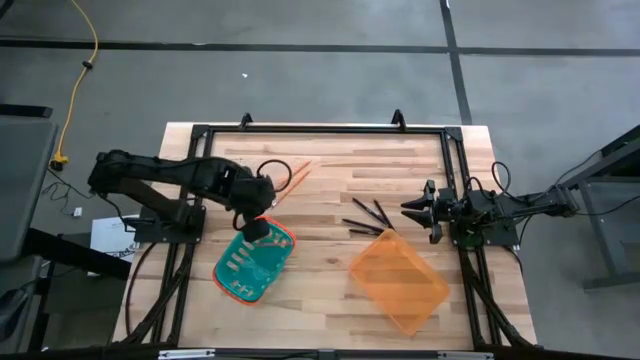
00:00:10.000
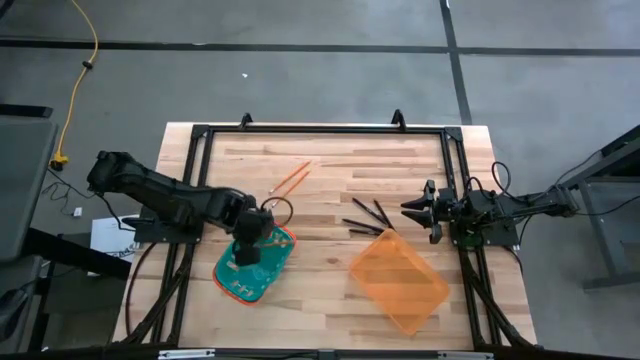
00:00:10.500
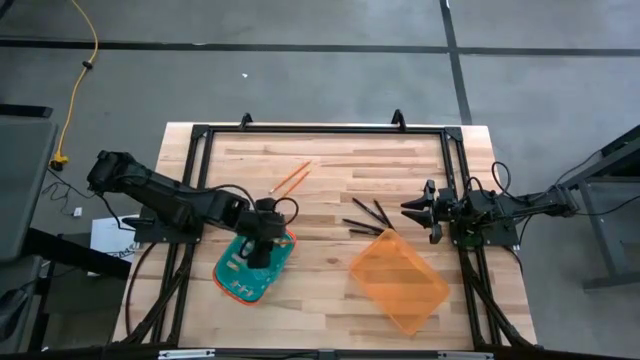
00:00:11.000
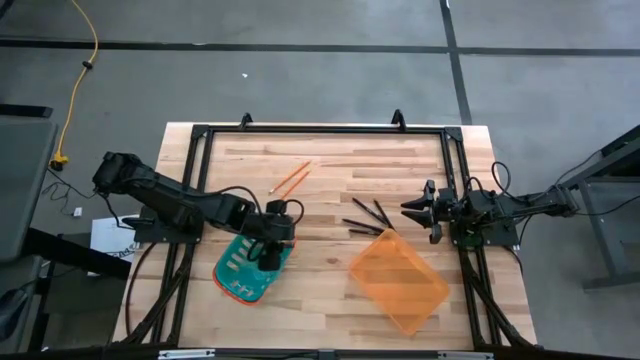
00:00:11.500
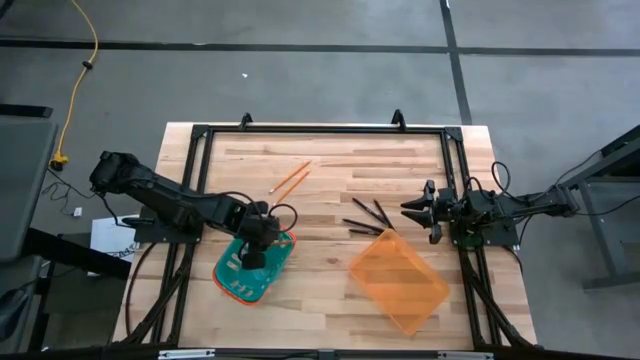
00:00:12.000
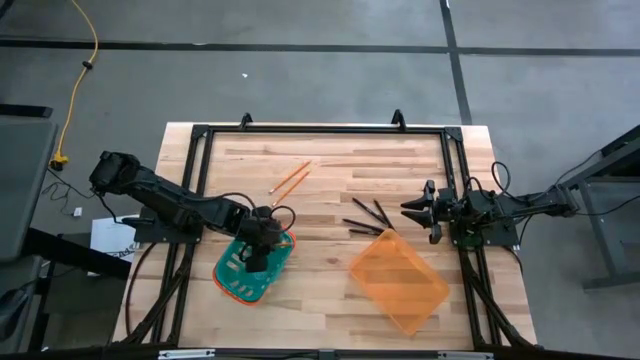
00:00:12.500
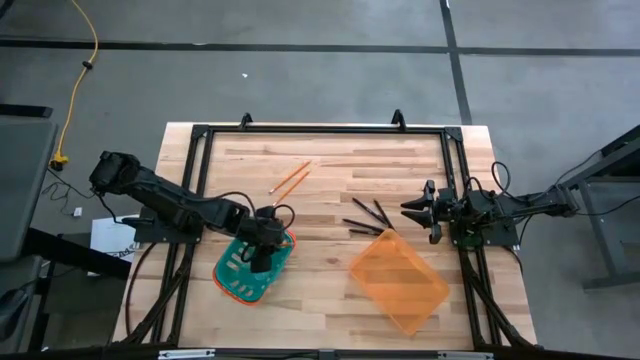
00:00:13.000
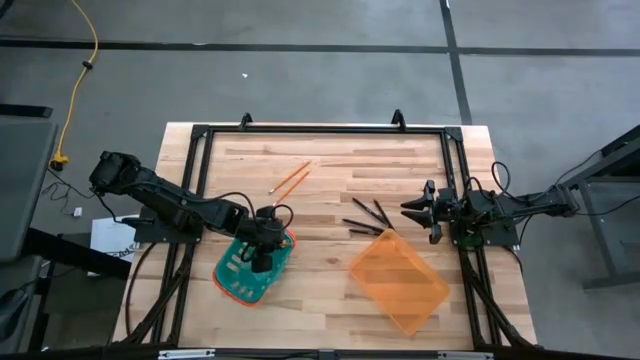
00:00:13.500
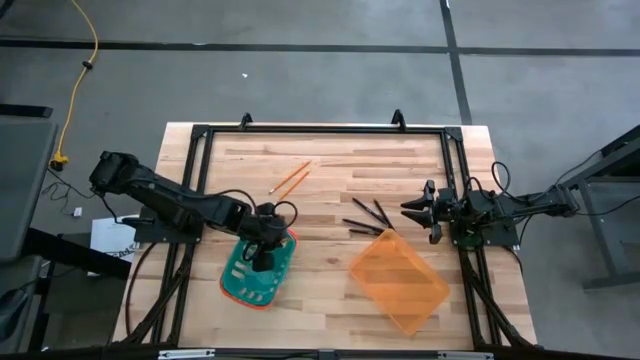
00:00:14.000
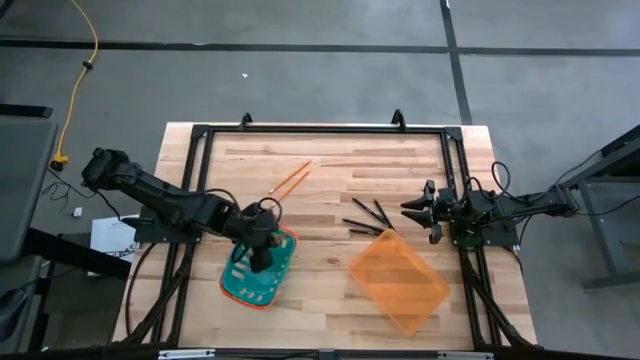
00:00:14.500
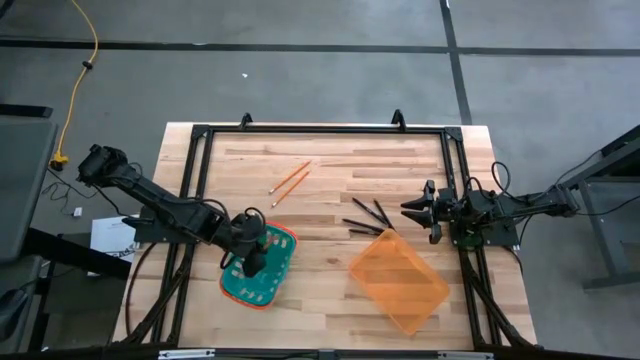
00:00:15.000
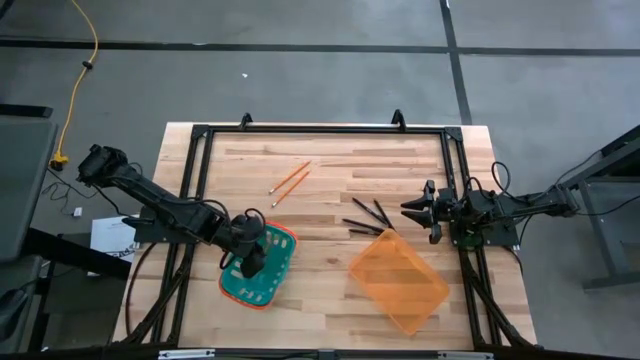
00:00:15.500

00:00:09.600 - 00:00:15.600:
Task: Sort pens & pencils
Put the orange pencil into the blue basket

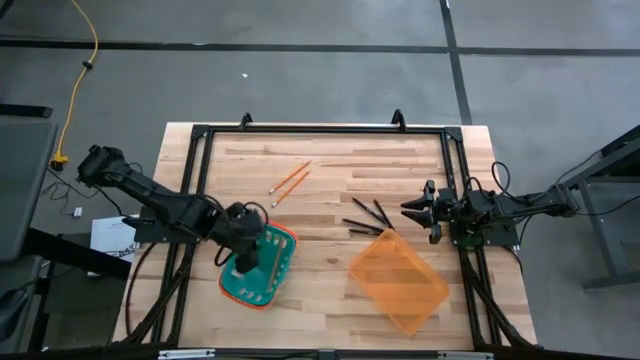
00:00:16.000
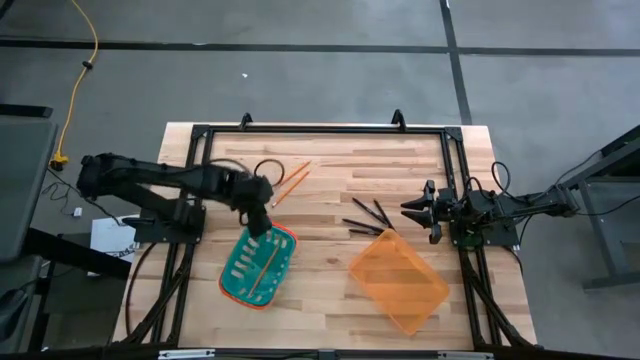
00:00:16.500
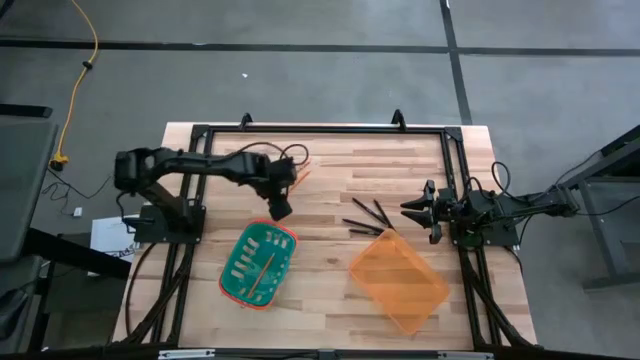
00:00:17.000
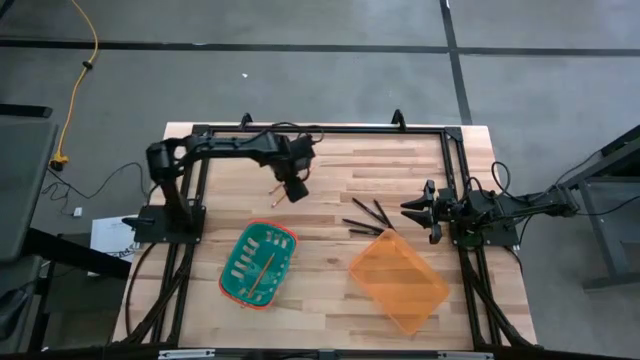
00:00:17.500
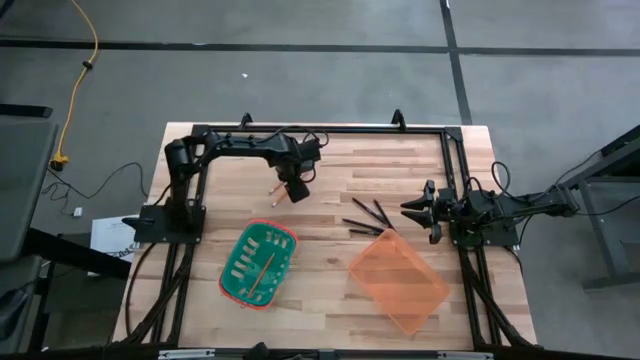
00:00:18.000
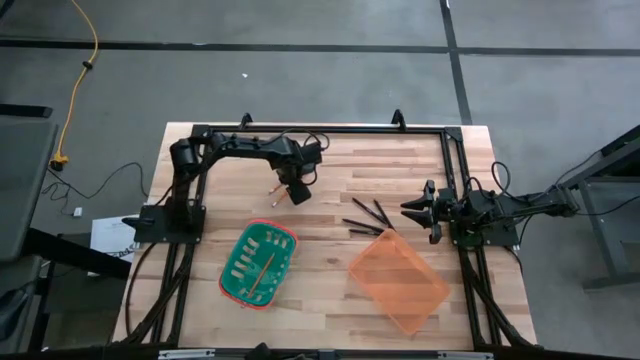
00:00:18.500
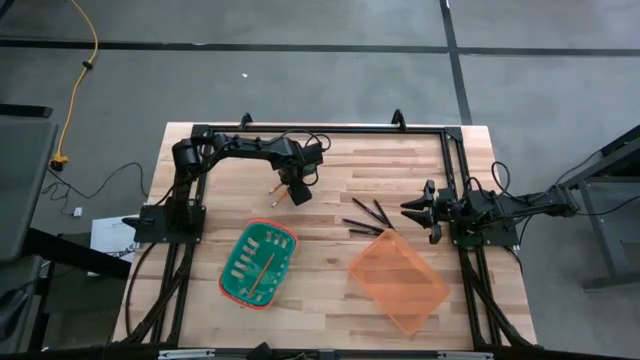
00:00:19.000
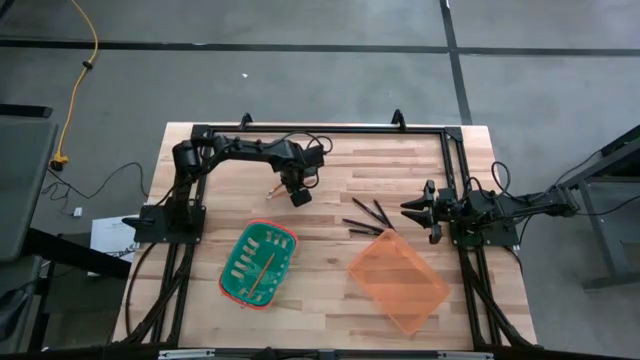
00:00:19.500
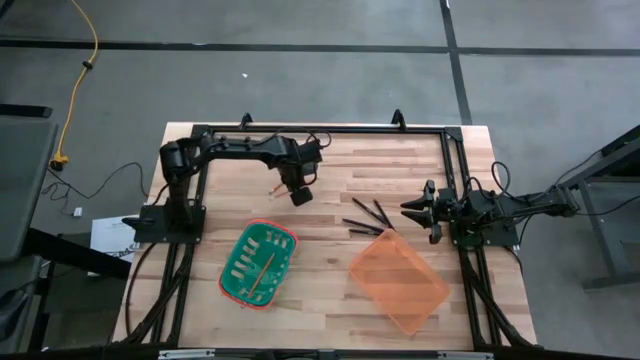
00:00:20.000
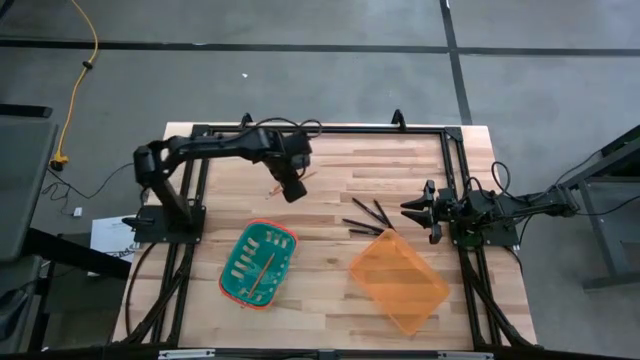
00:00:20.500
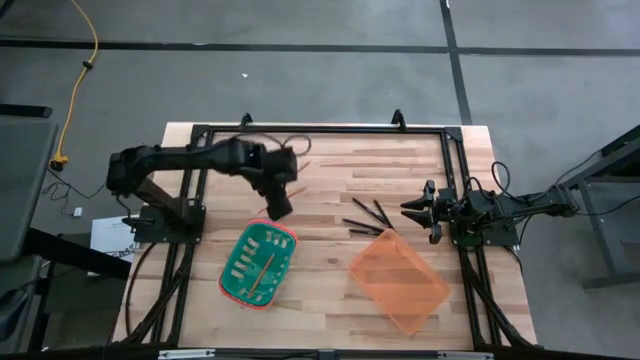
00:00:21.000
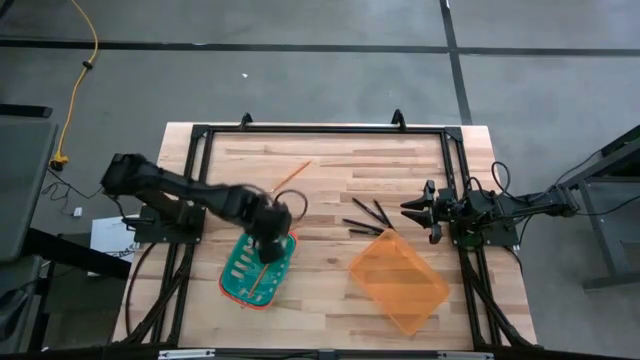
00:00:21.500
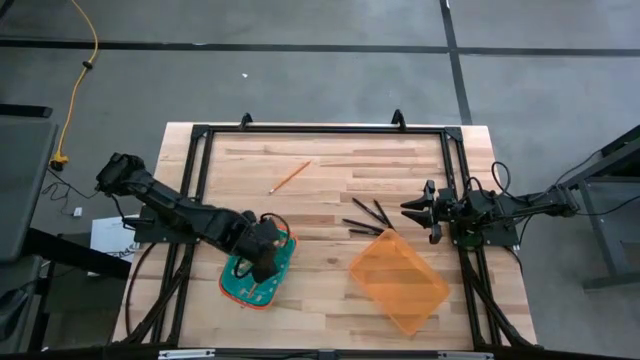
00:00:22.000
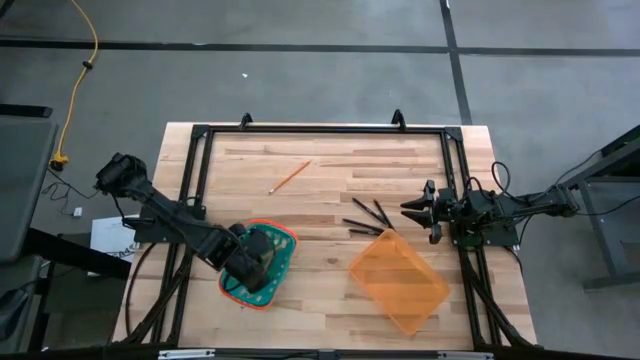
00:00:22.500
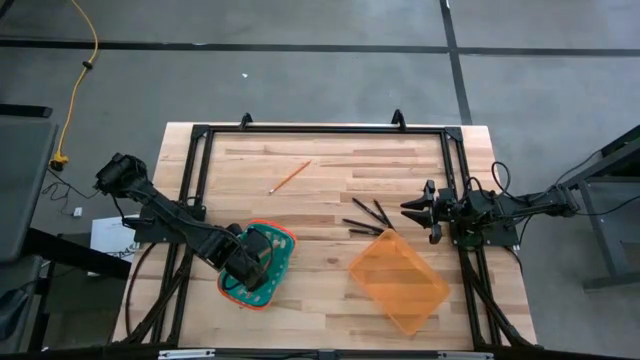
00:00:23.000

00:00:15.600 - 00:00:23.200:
Put the orange pencil into the blue basket

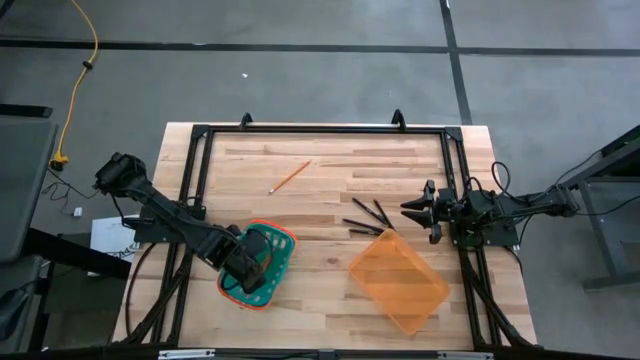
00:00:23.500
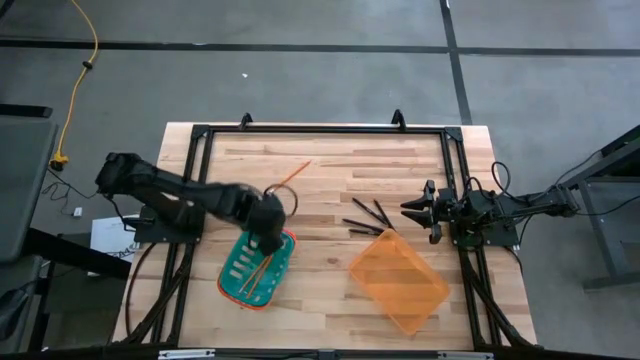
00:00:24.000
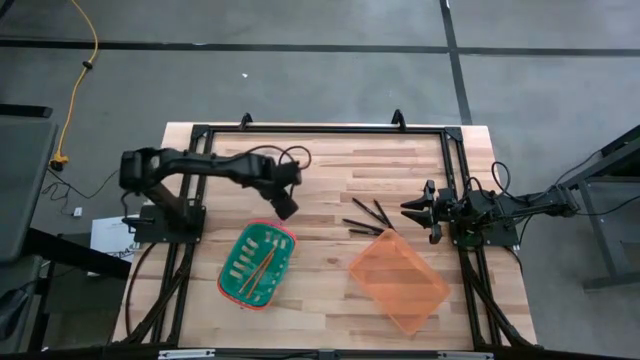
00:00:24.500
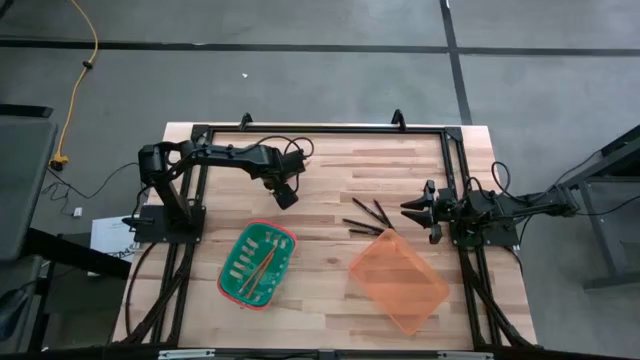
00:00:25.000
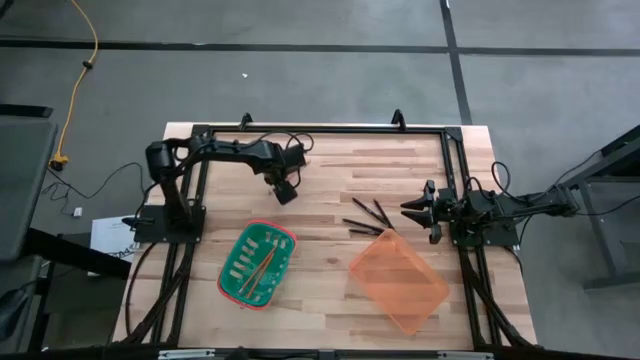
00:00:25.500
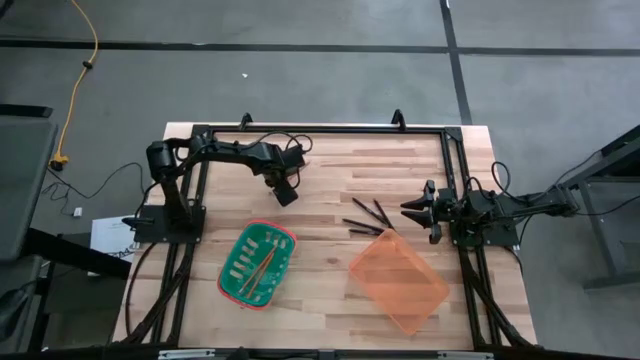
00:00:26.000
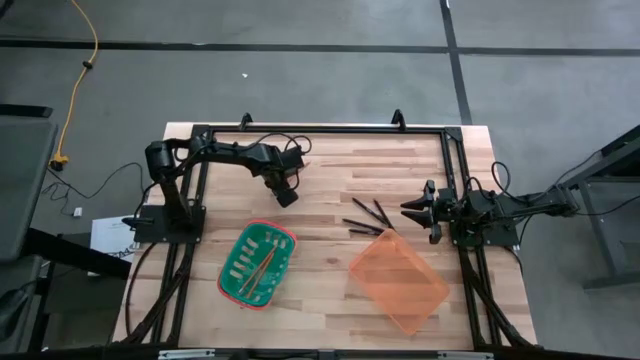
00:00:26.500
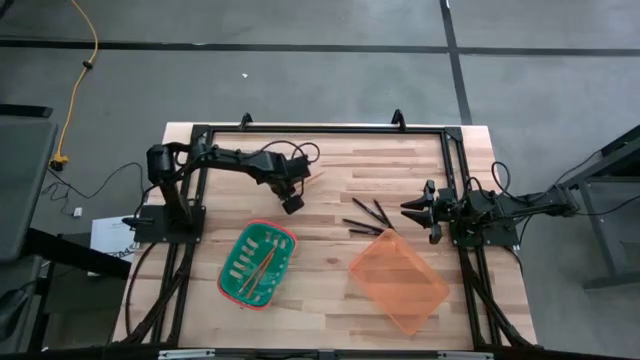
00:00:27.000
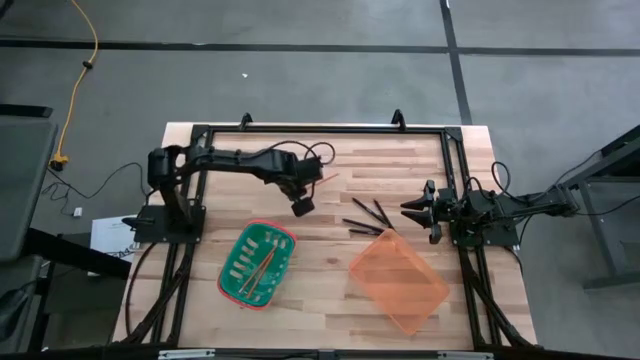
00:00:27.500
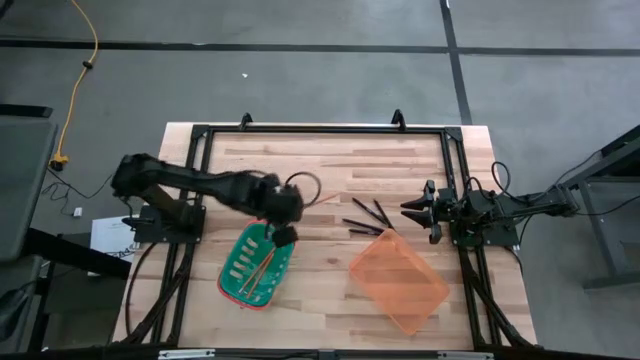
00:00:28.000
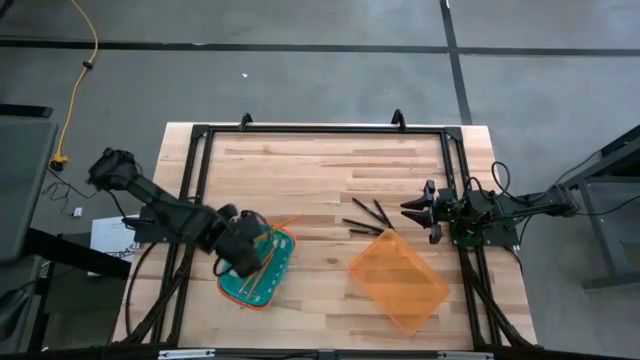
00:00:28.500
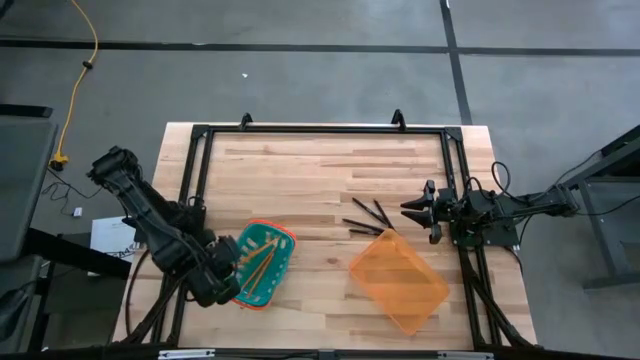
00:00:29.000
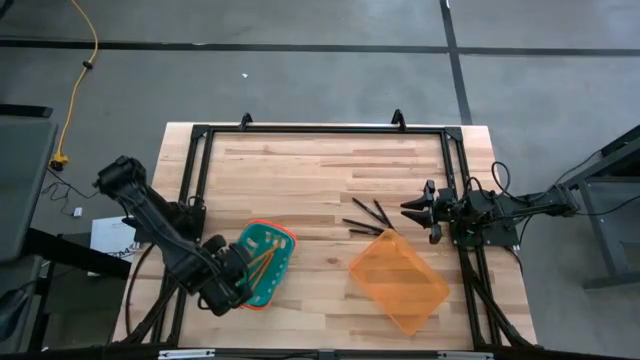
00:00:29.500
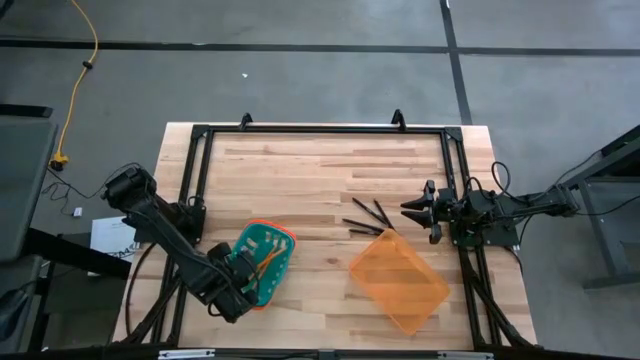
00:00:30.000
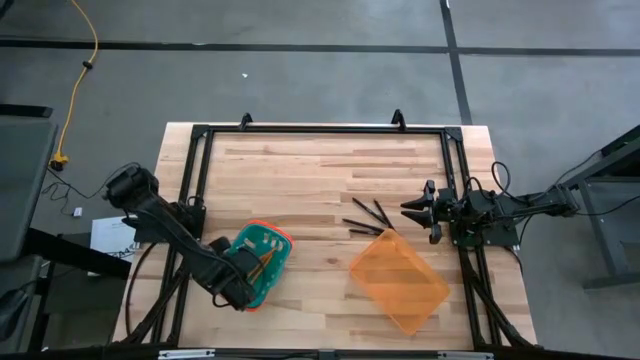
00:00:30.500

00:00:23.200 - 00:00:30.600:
Put the orange pencil into the blue basket
